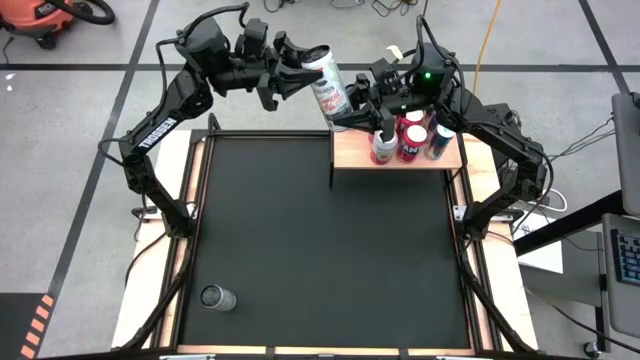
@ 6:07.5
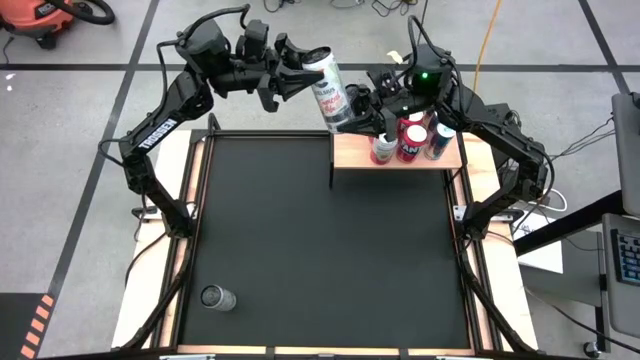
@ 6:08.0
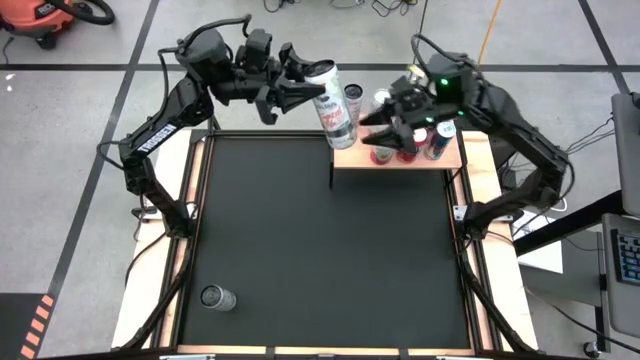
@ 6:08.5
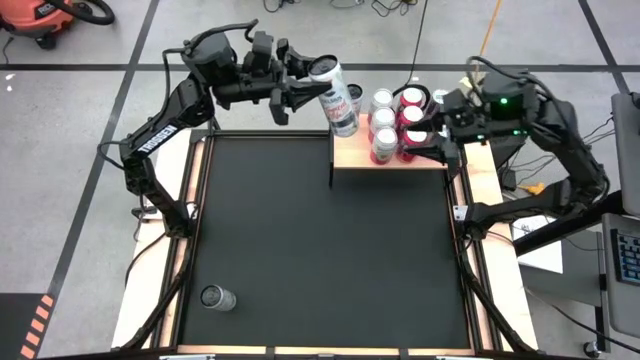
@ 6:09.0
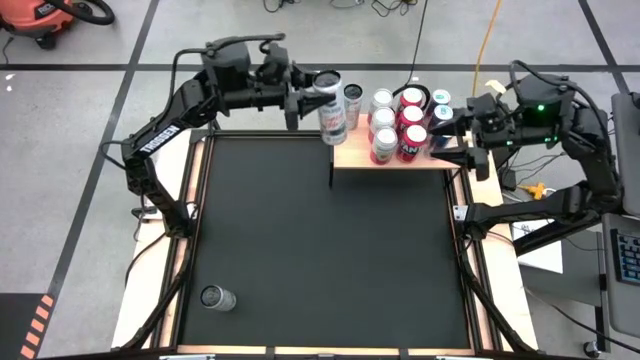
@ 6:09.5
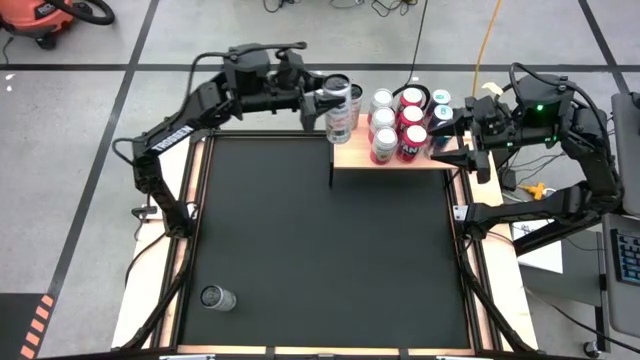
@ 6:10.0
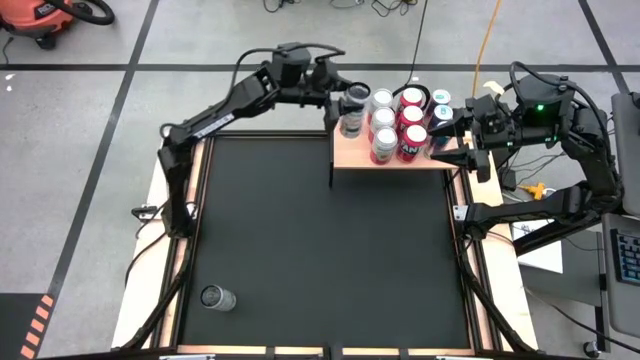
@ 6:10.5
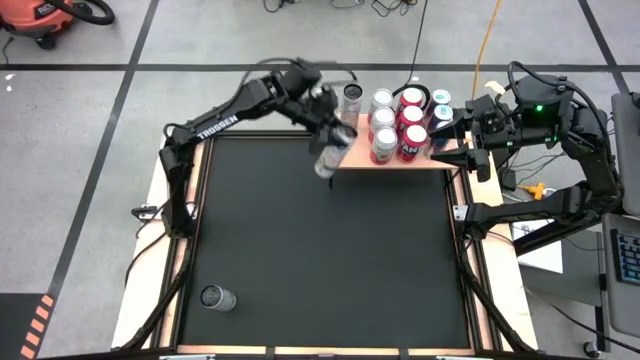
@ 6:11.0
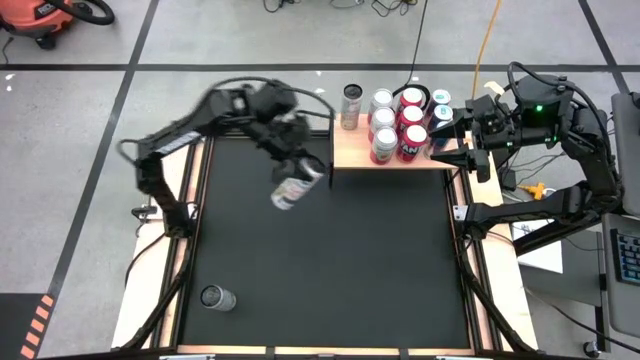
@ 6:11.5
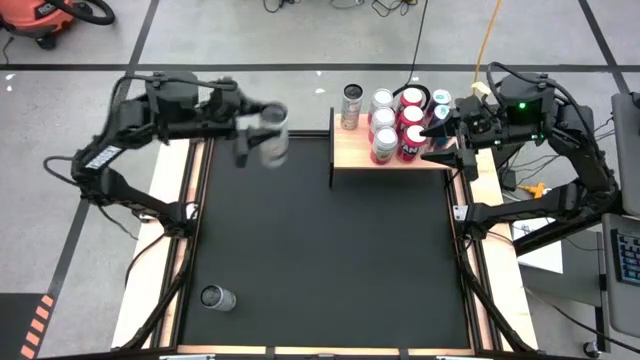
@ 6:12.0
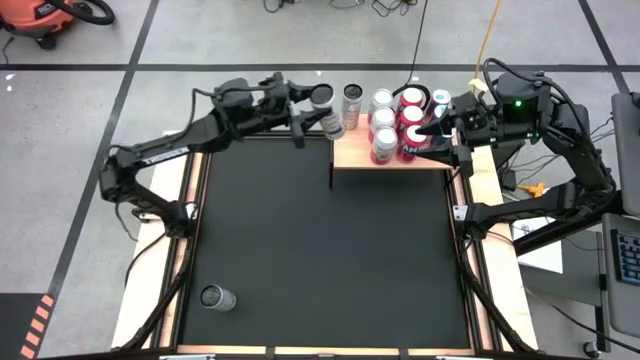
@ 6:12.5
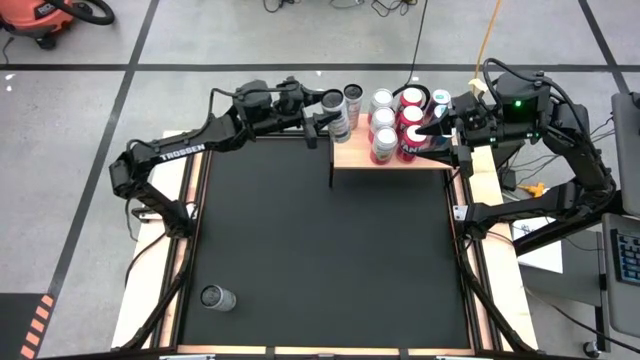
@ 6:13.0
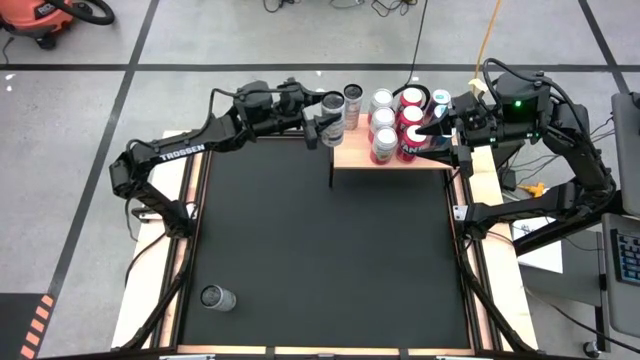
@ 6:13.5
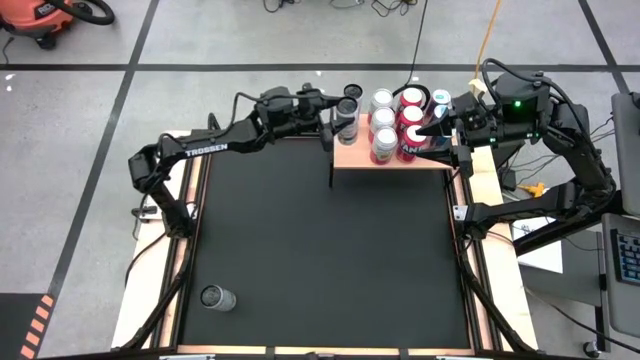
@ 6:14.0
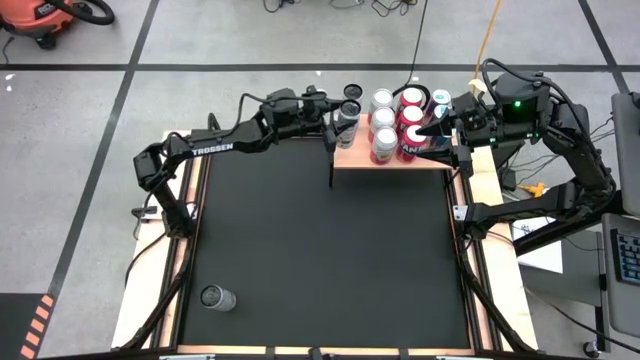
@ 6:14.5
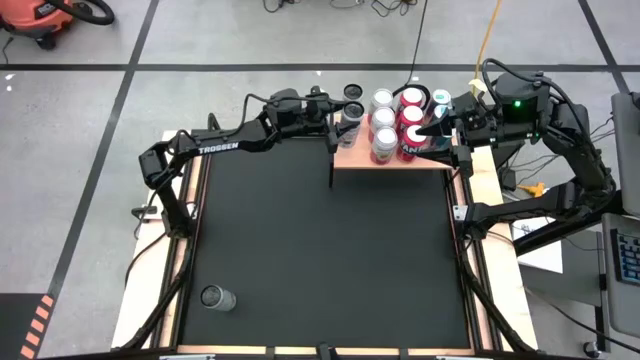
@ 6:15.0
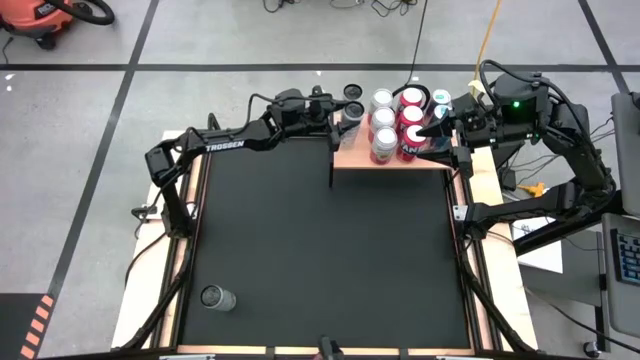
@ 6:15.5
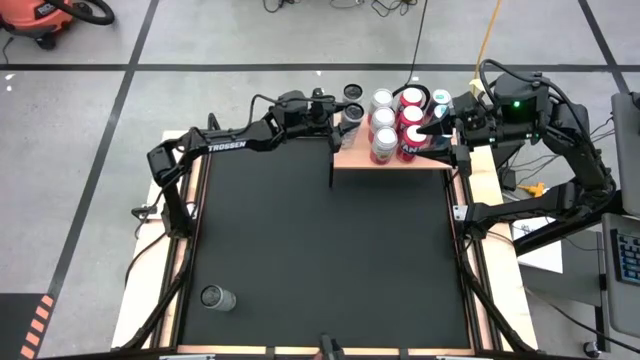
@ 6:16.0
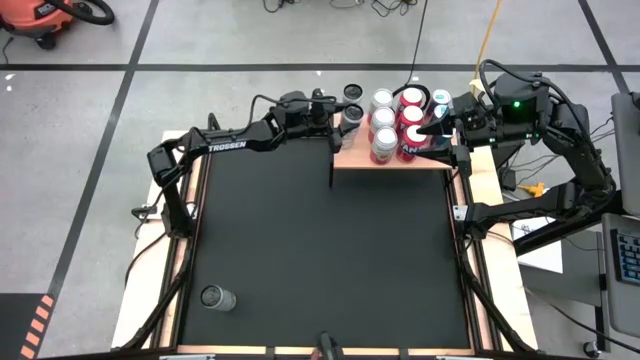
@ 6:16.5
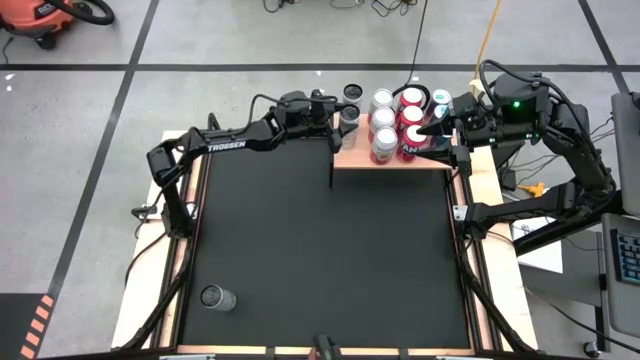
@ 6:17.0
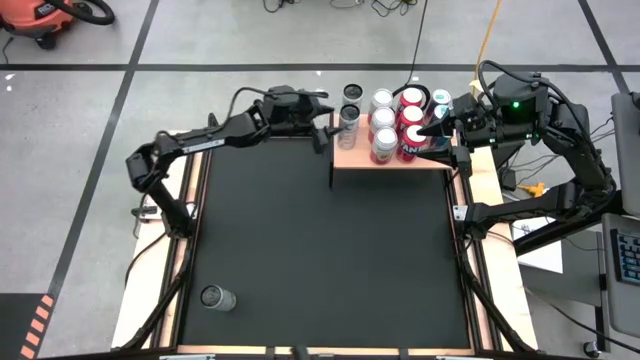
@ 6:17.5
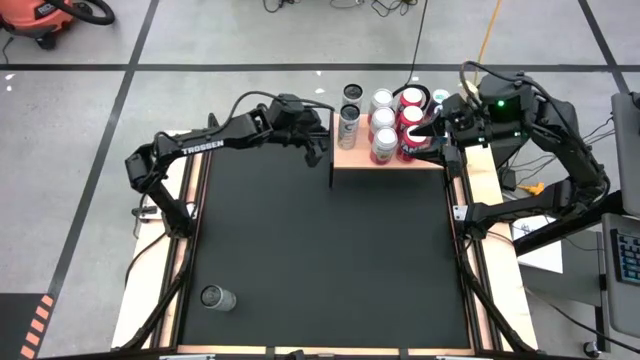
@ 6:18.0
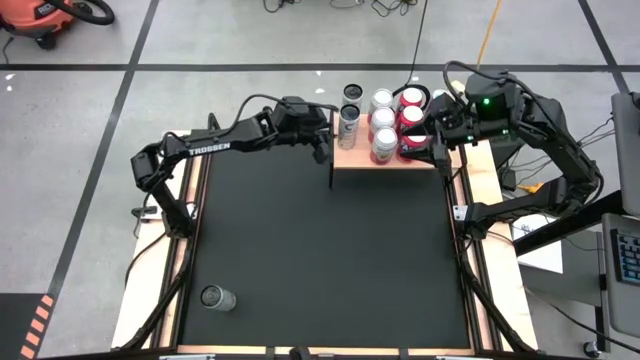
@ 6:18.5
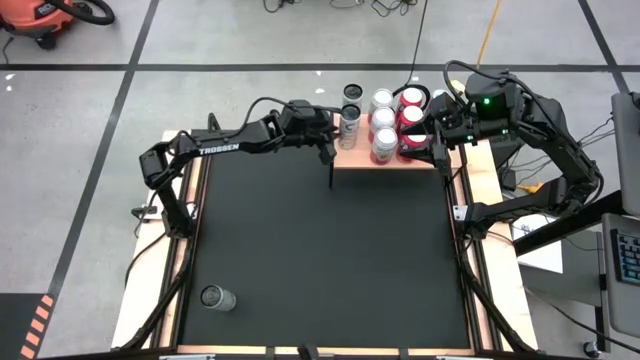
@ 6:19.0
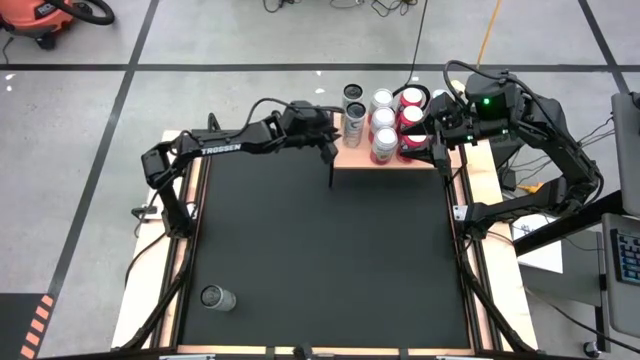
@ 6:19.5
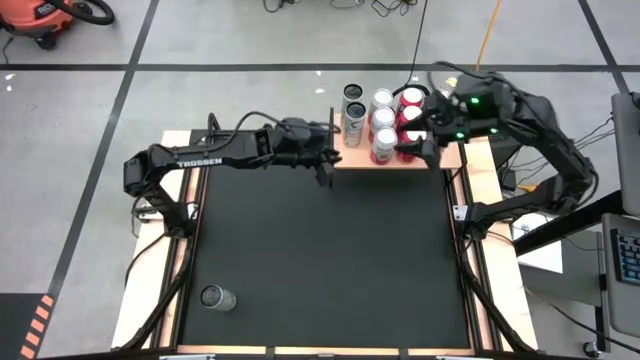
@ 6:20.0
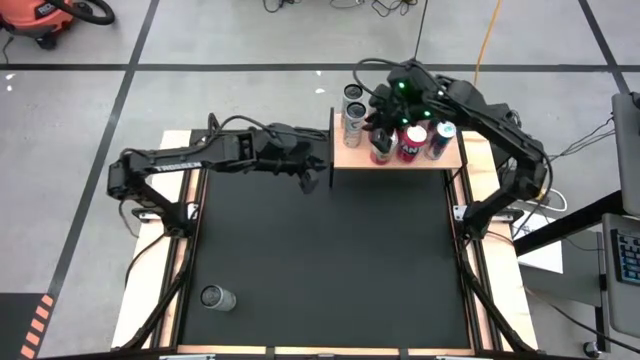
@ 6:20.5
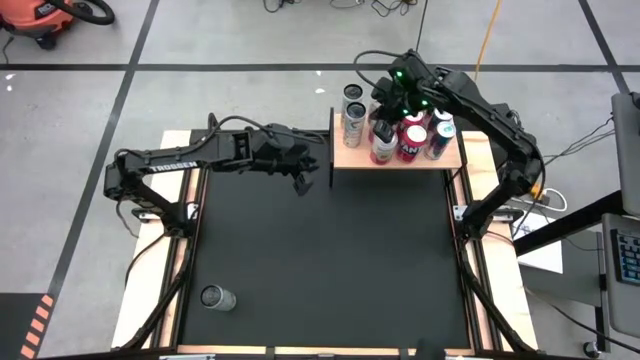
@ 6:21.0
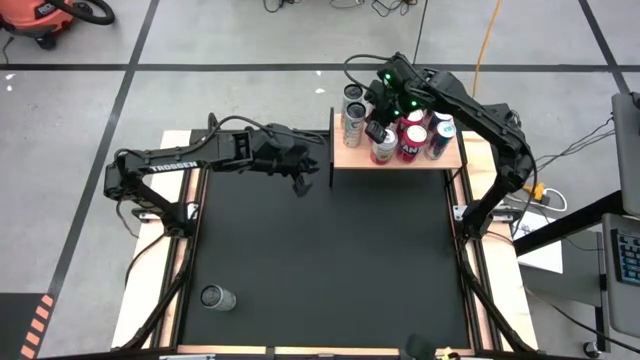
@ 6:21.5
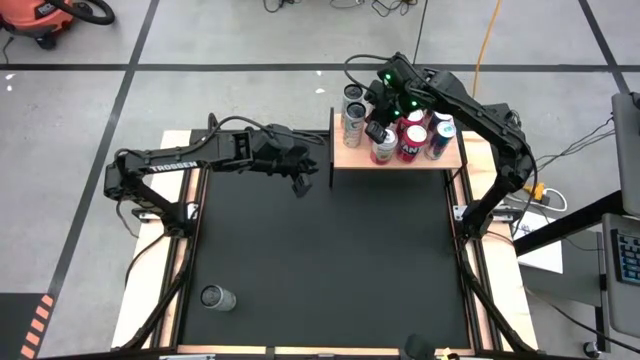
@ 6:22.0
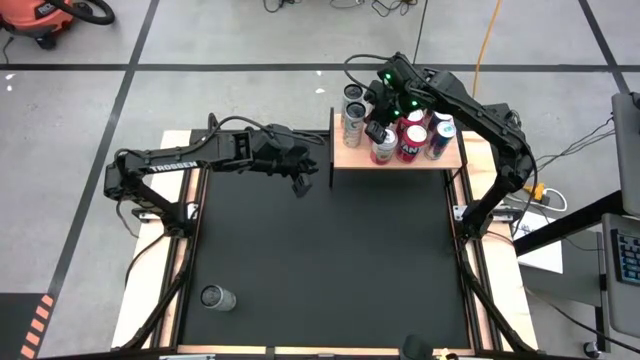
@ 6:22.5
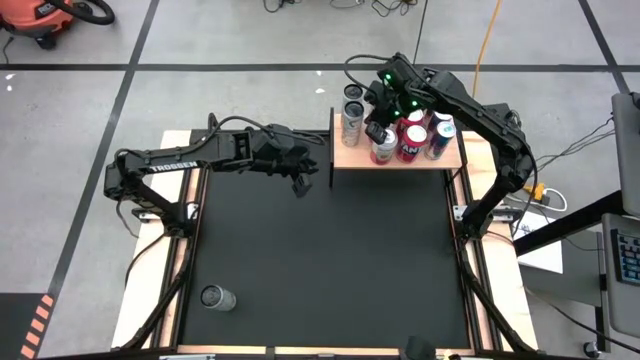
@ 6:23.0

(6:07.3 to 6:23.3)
Task: Place canned beverage on shelf
Put the top white yellow soda can on the shelf aligned with the other white yellow soda can

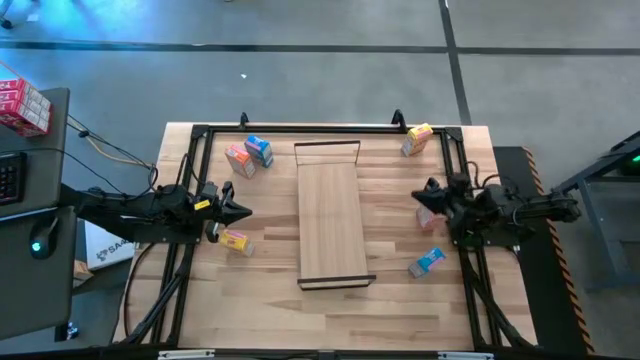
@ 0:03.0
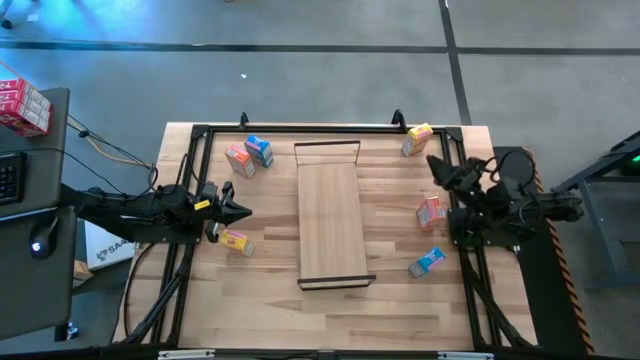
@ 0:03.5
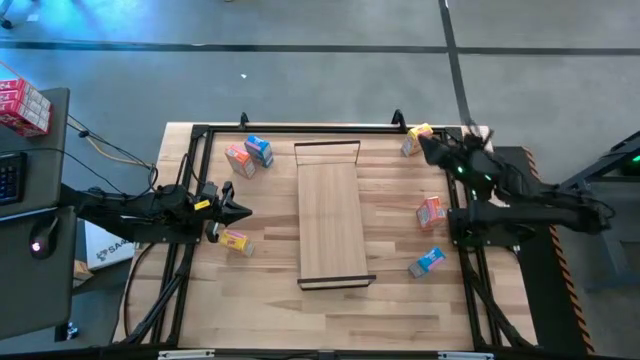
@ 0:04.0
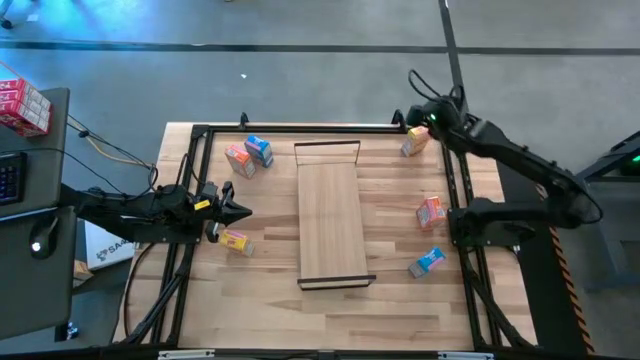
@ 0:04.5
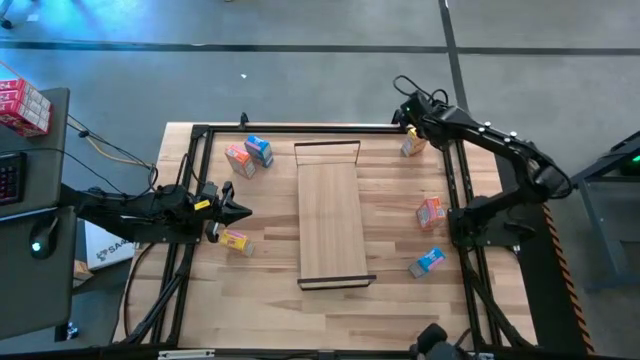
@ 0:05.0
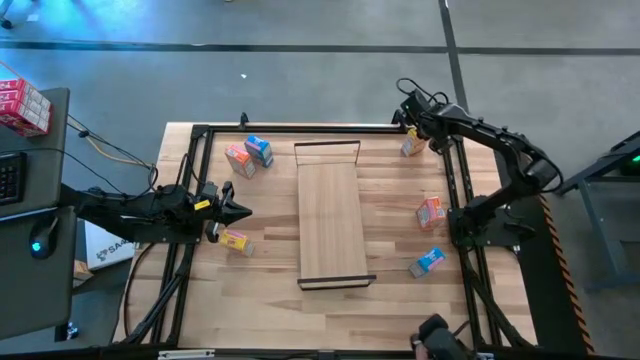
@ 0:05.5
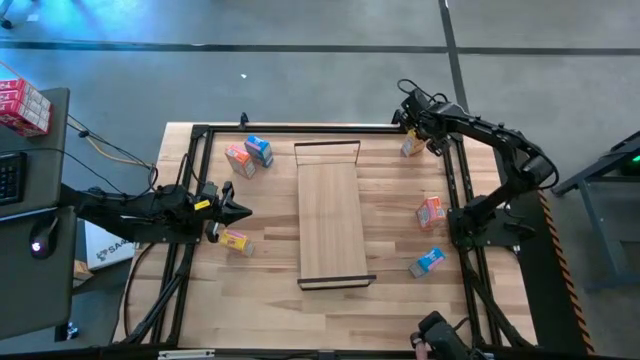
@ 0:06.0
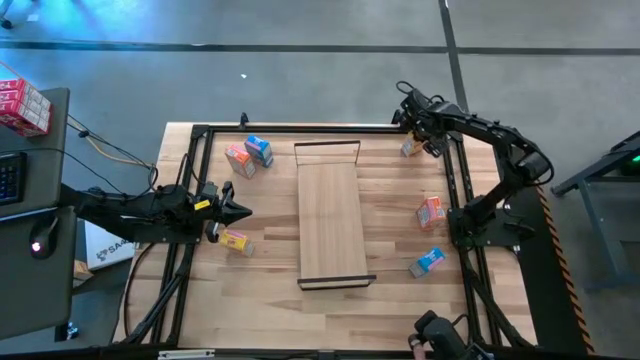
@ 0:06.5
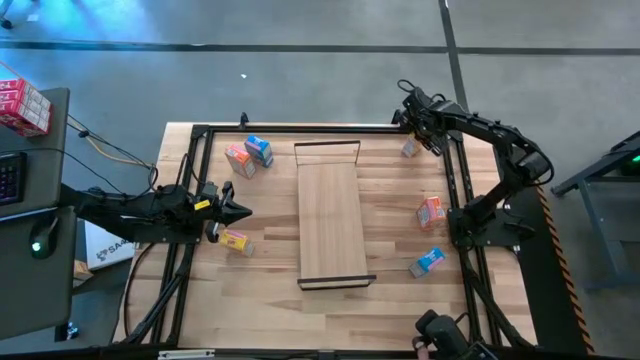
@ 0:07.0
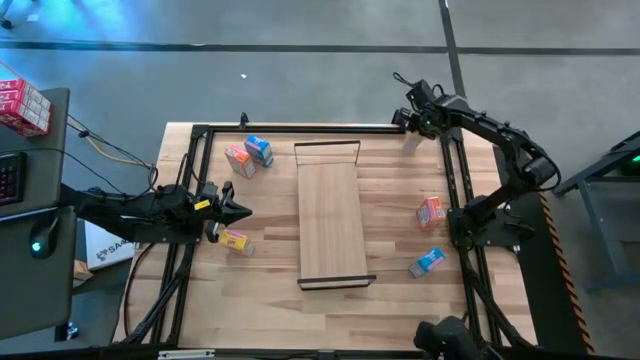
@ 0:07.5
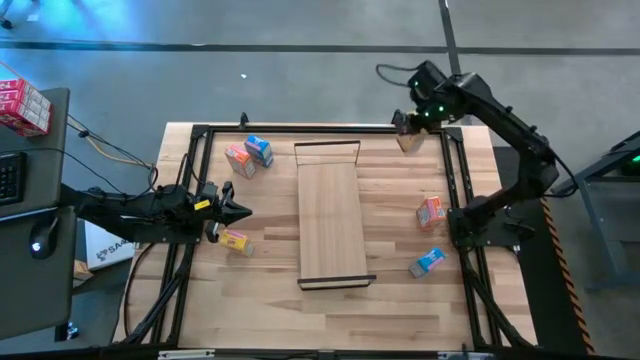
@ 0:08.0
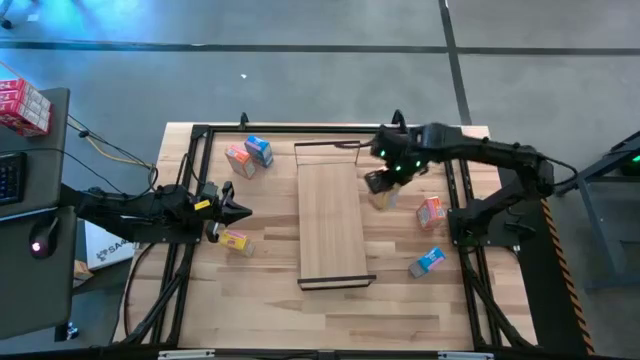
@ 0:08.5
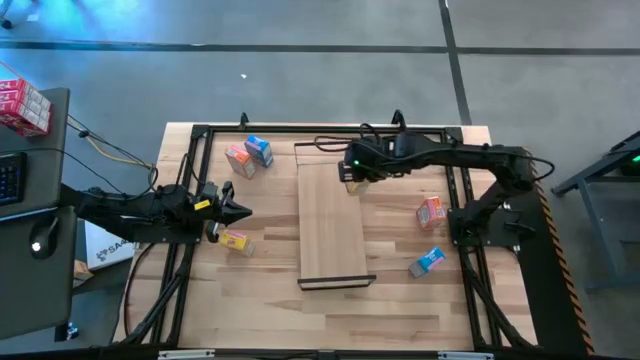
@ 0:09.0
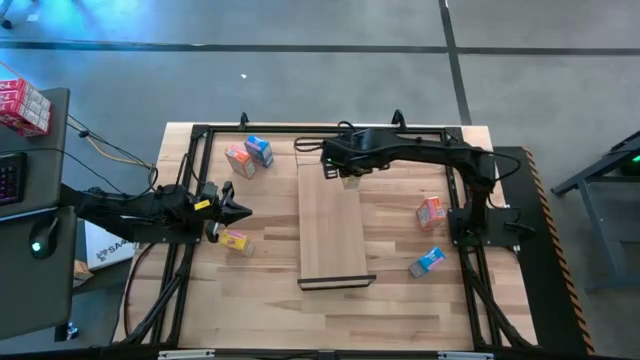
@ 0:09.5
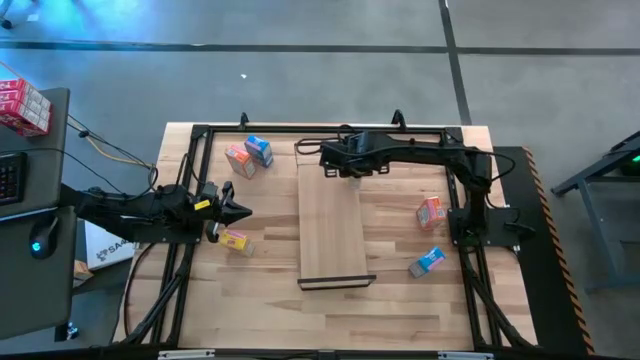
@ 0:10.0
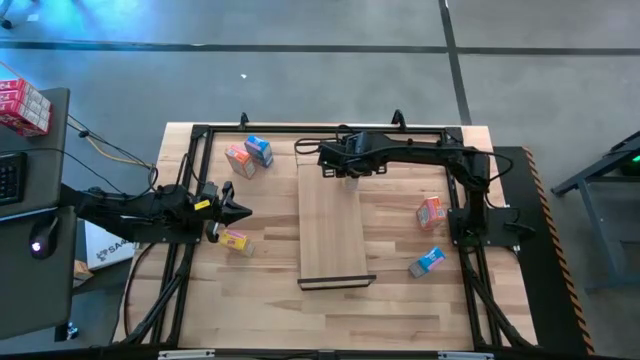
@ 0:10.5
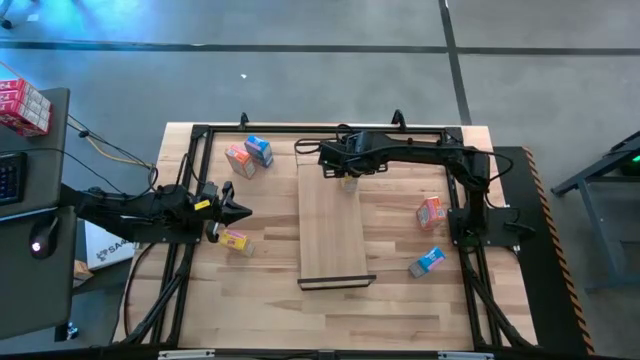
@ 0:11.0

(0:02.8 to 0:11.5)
Task: Stack cereal on shelf
Stack the right yellow cereal box on the shelf
